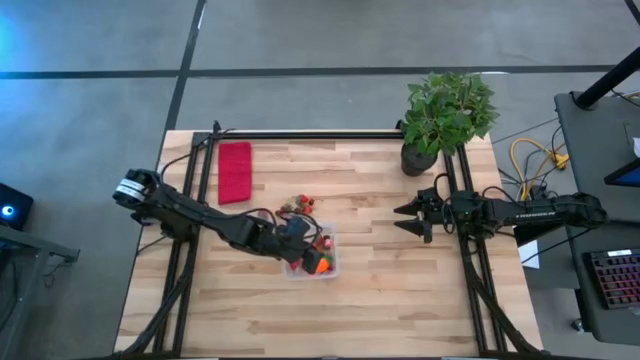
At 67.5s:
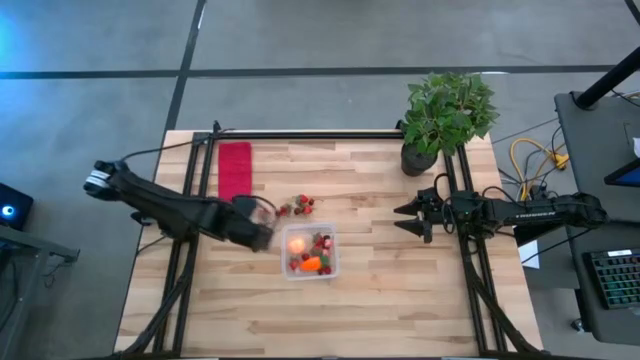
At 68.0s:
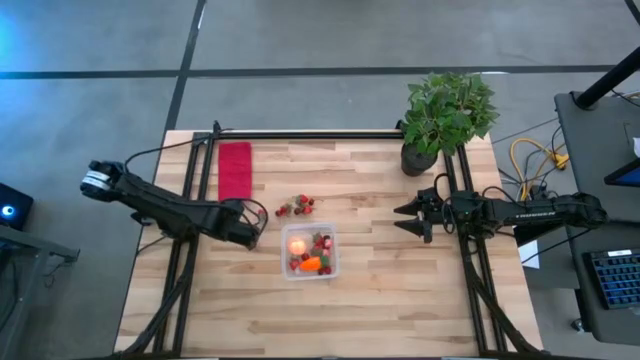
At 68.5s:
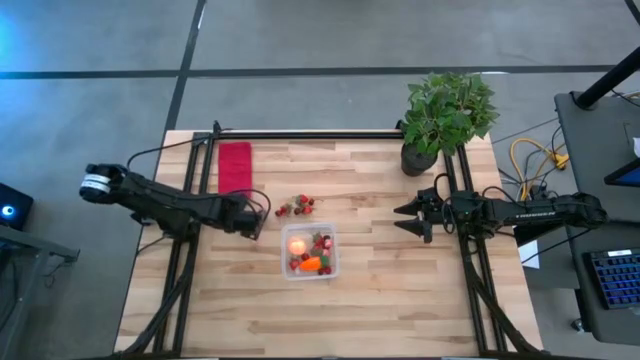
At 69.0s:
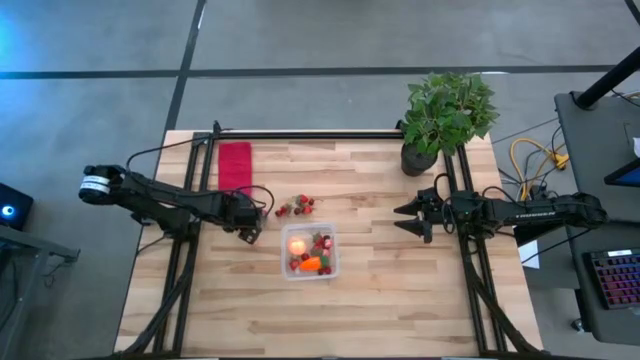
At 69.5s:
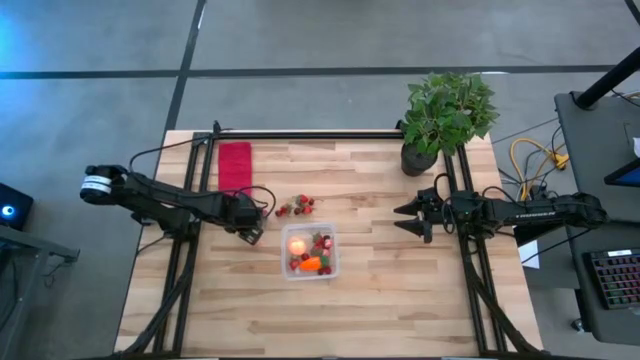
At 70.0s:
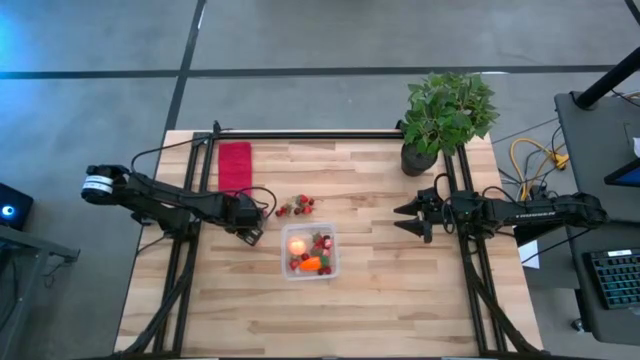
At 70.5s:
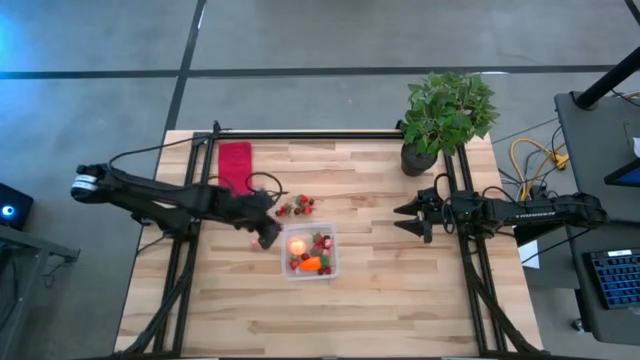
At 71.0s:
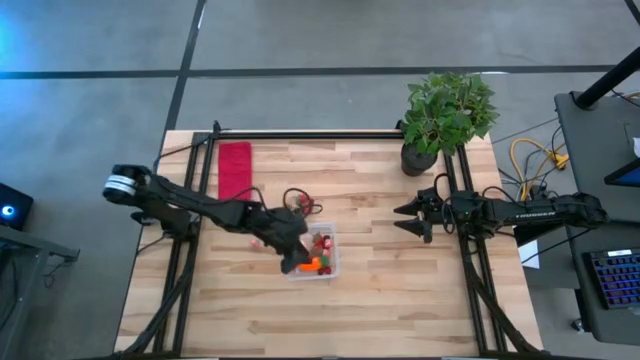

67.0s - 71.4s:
Task: Pick and placing Produce into tupperware
Put the red cherry into the transparent bin

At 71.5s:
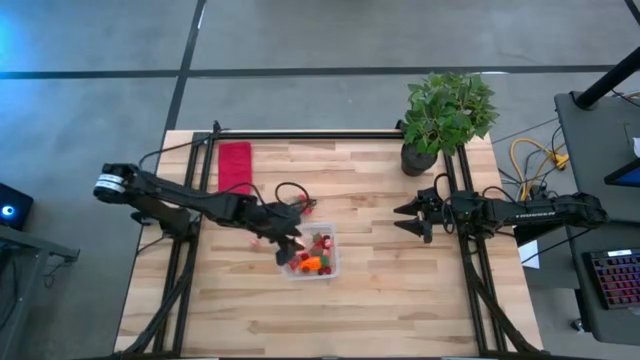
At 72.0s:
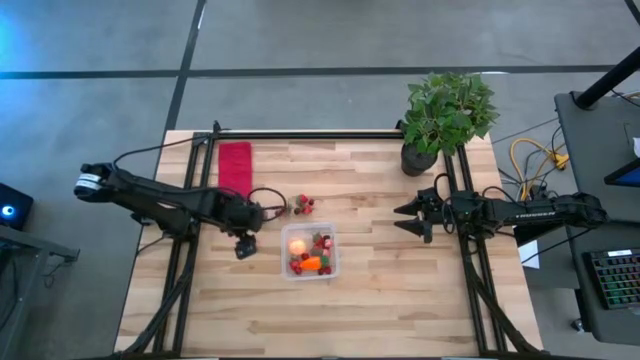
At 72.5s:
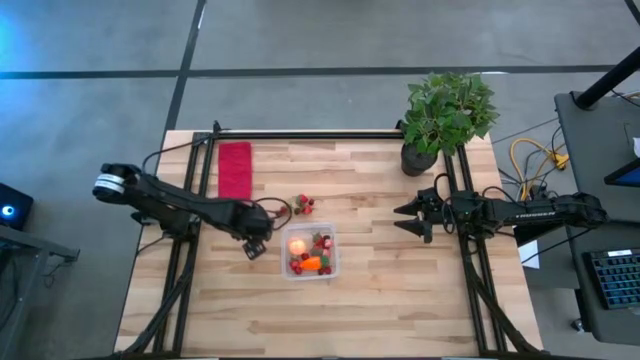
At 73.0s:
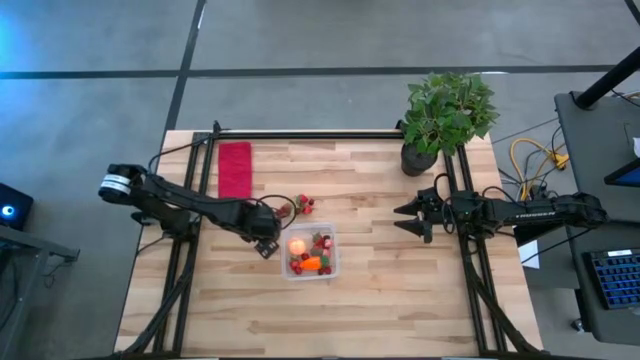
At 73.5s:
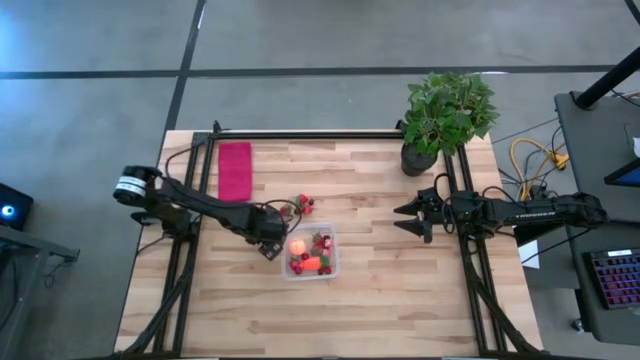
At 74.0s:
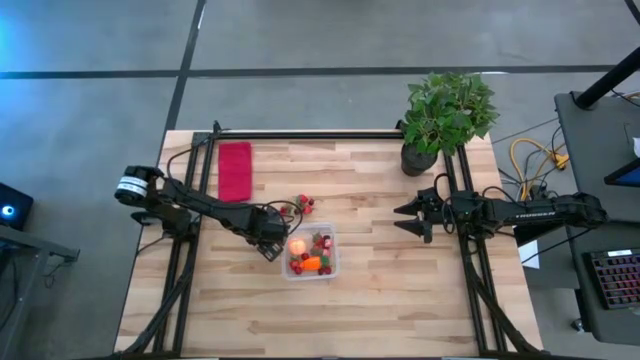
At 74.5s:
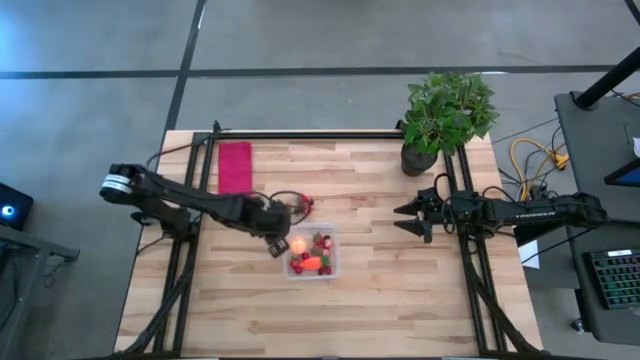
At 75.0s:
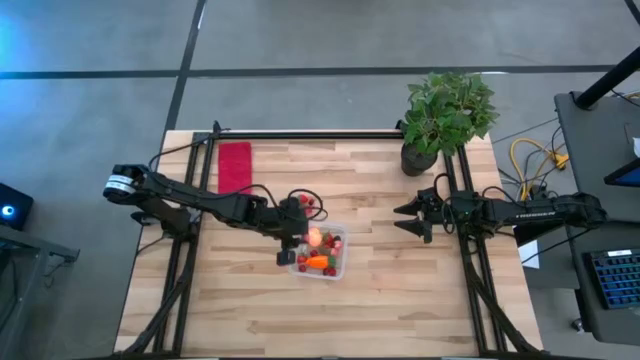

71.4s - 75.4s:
Put the pink peach into the transparent bin

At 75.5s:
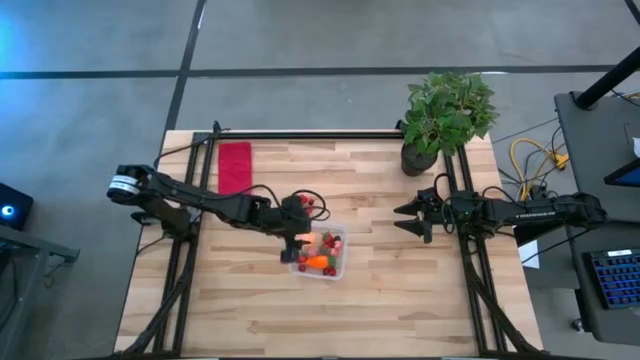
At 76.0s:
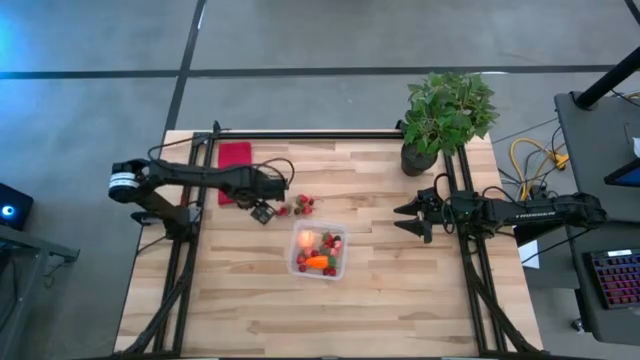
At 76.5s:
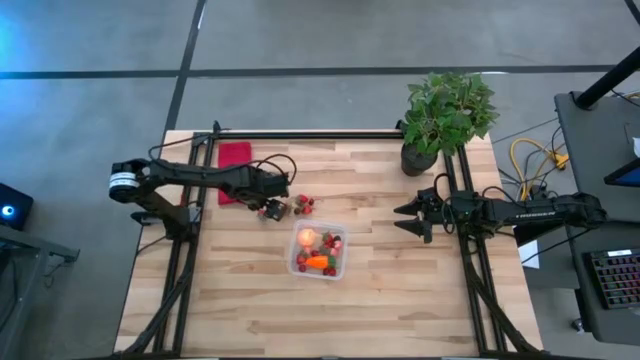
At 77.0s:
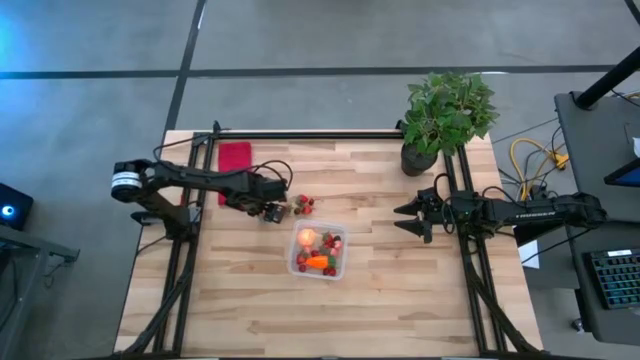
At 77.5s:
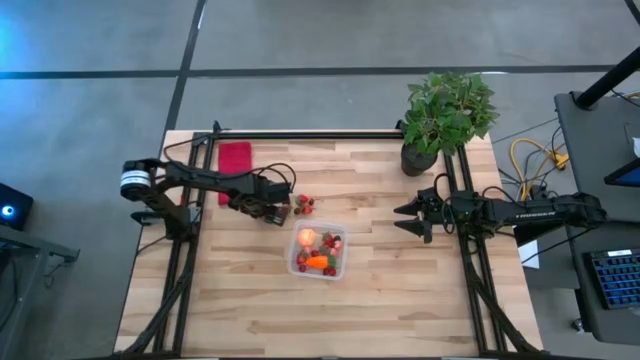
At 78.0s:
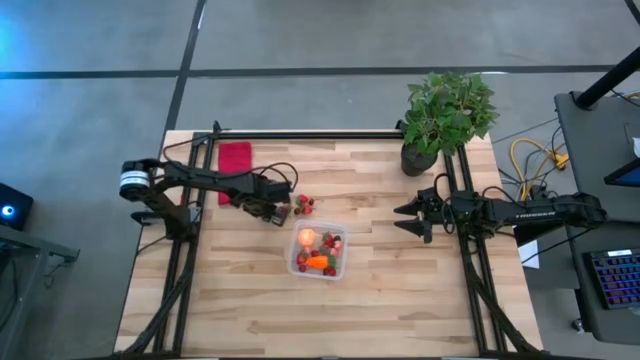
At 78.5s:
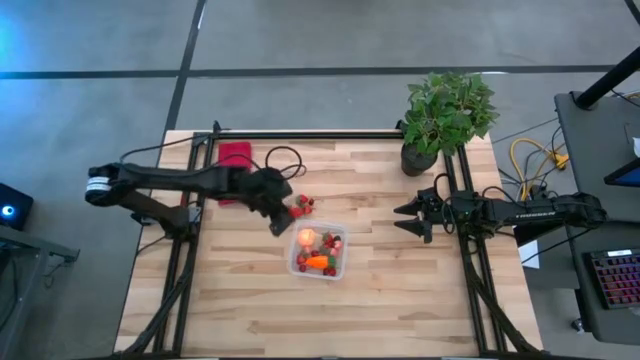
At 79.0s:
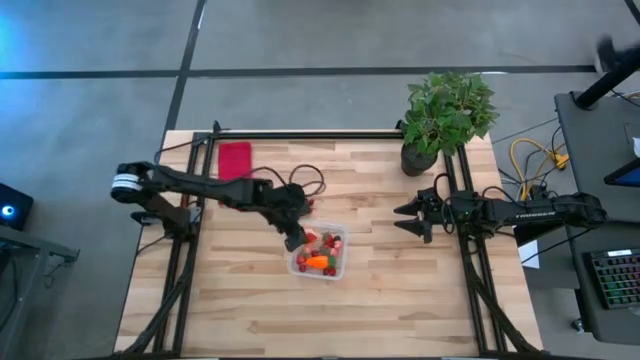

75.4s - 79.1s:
Put the red strawberry into the transparent bin

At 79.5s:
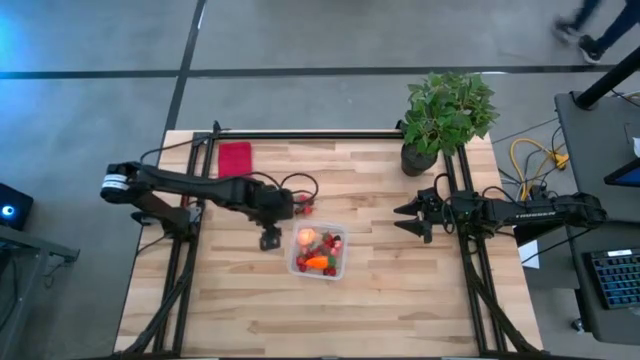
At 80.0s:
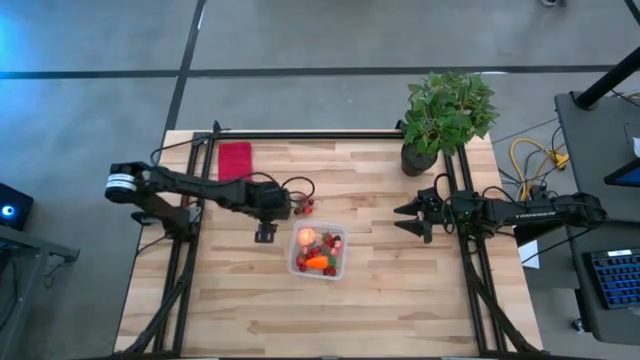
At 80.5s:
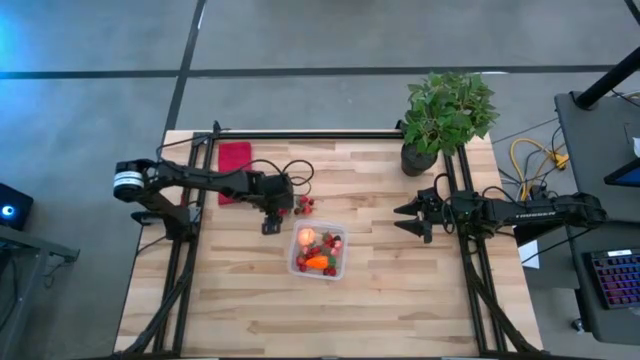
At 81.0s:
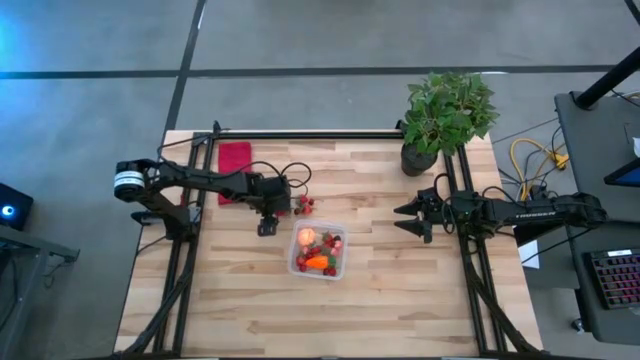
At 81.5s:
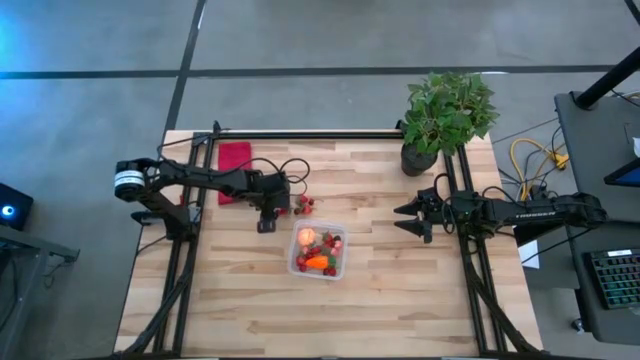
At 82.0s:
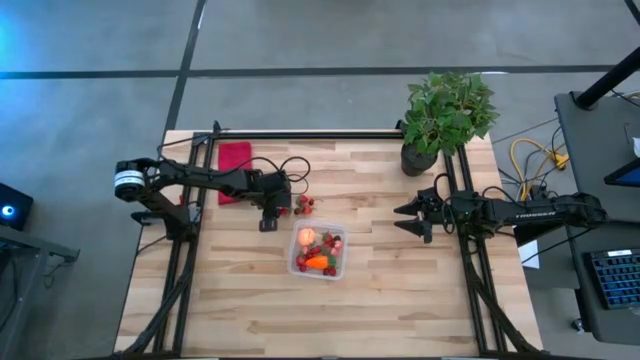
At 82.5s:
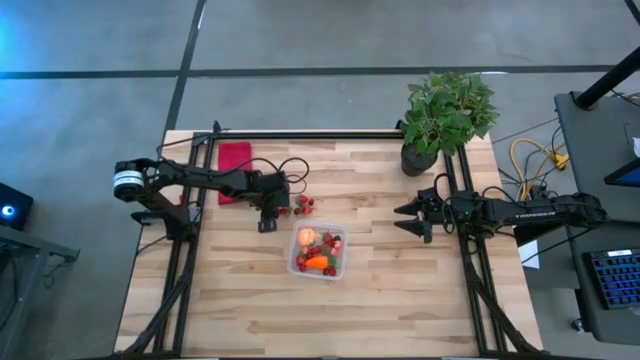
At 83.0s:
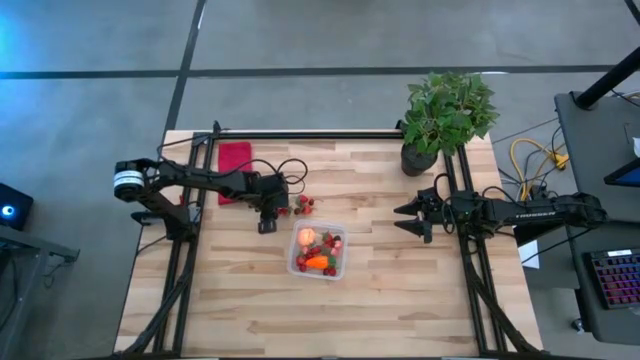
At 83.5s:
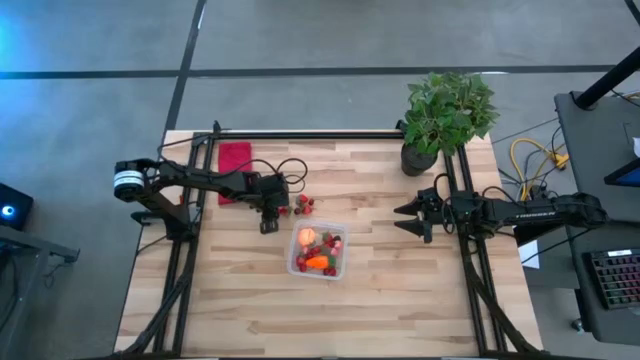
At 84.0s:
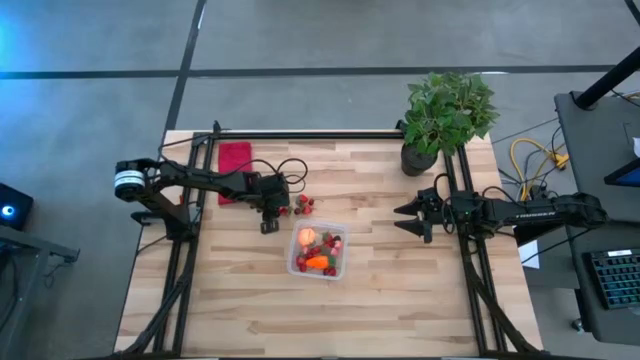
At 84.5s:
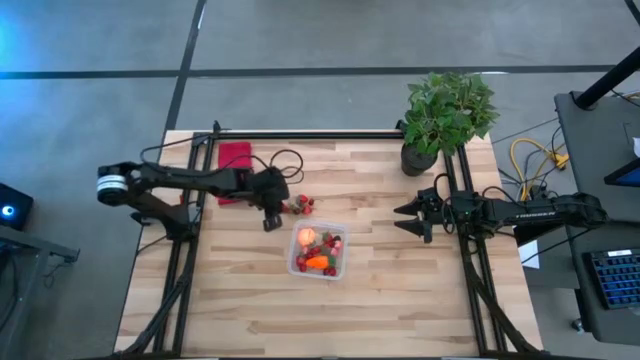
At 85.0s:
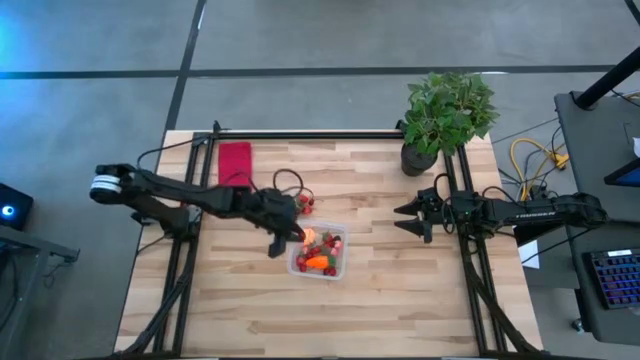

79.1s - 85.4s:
Put the red cherry into the transparent bin

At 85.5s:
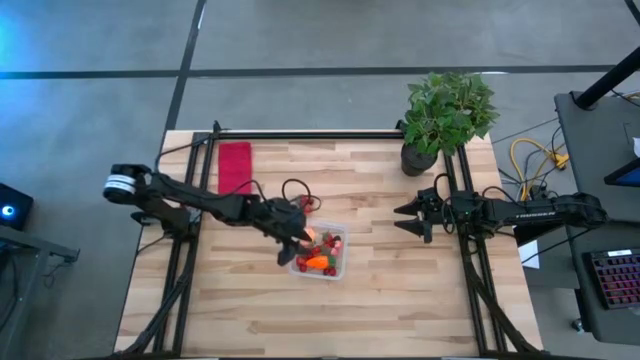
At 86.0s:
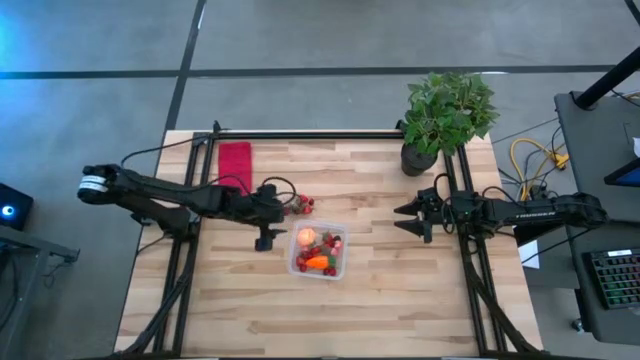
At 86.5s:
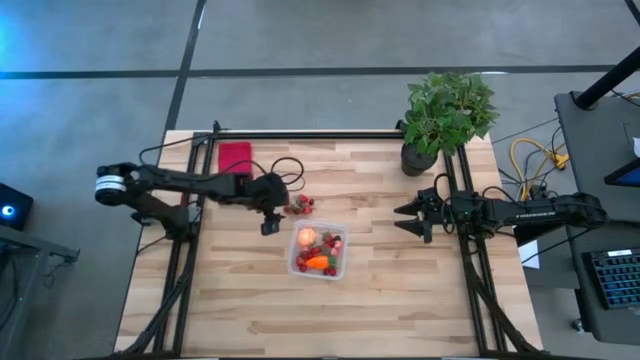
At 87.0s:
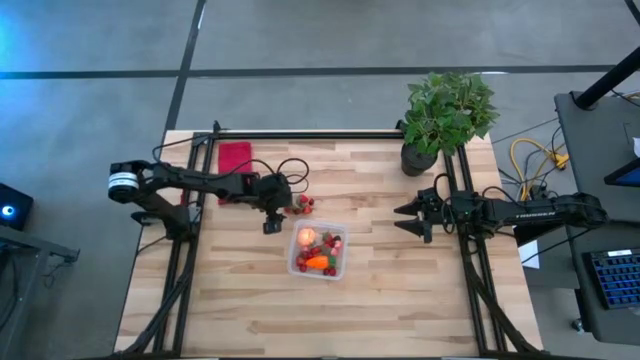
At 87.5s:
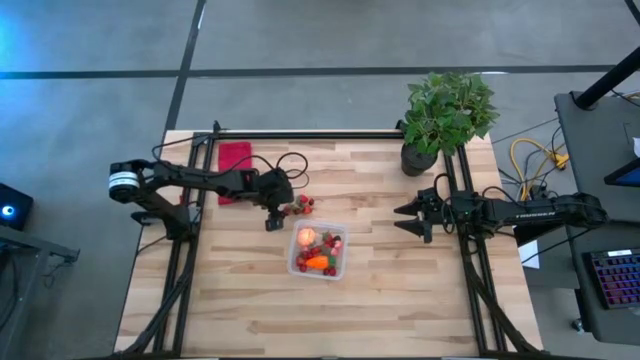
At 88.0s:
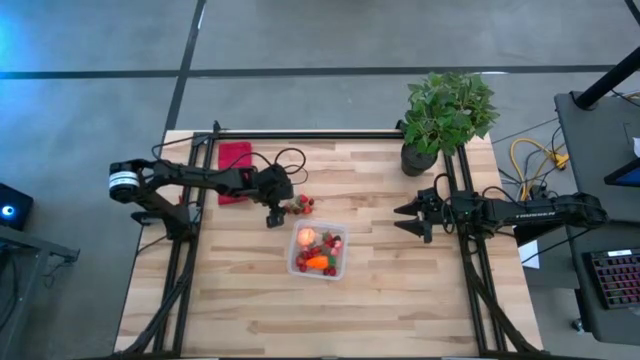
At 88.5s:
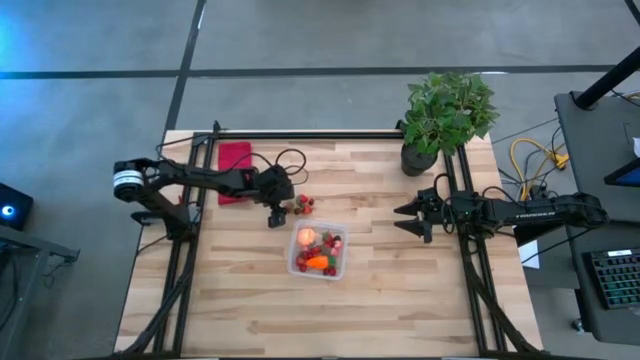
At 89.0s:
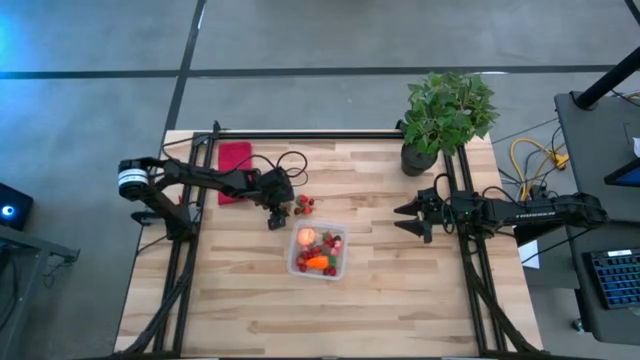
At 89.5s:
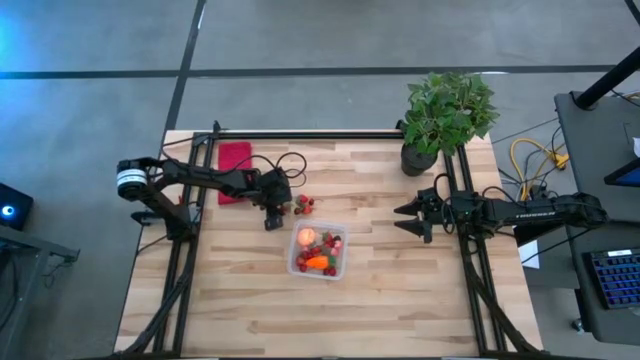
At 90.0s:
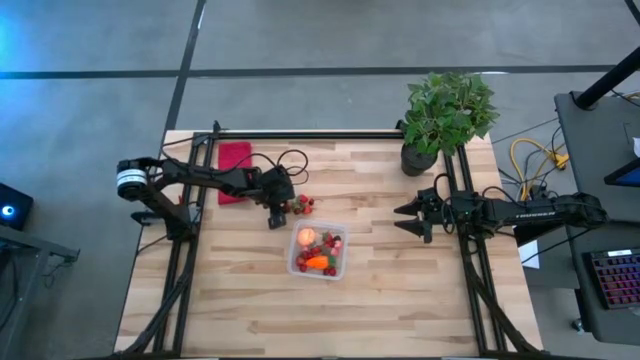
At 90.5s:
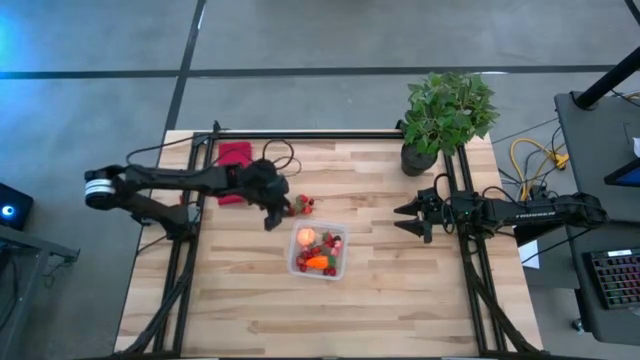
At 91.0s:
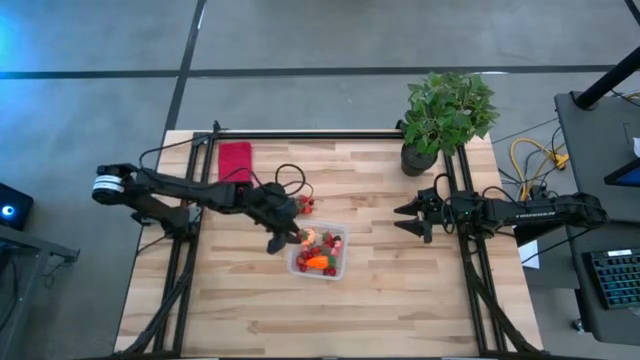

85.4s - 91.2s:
Put the red strawberry into the transparent bin
